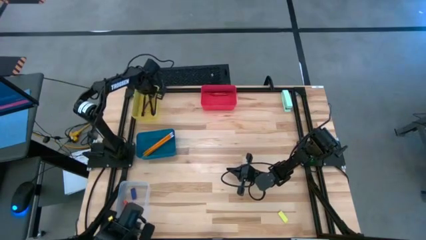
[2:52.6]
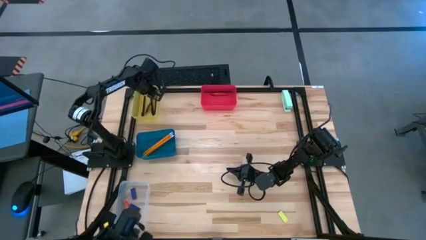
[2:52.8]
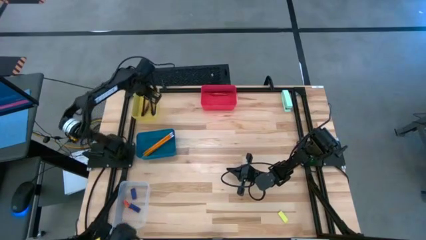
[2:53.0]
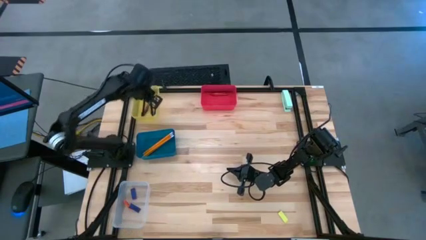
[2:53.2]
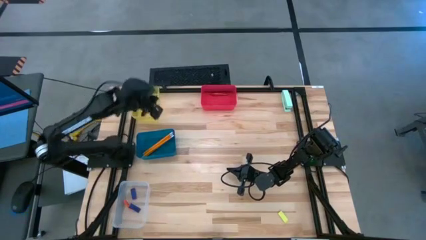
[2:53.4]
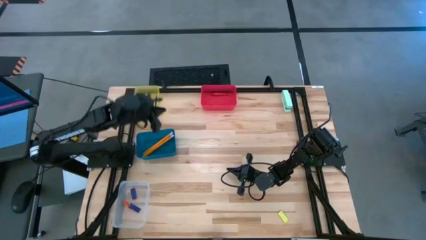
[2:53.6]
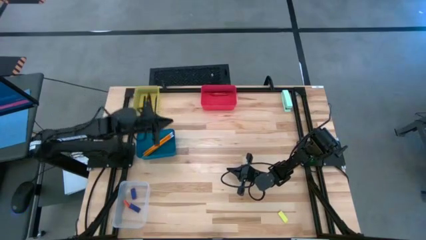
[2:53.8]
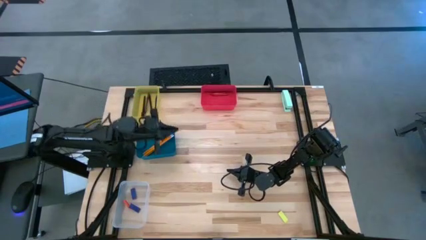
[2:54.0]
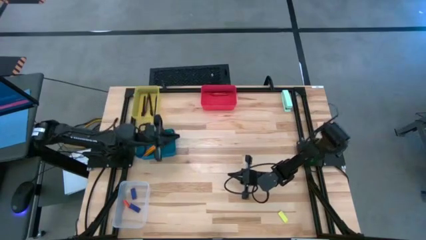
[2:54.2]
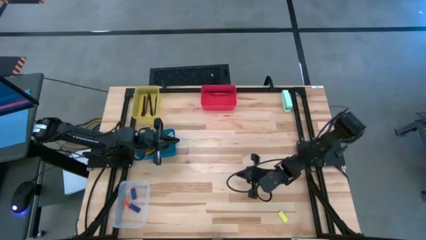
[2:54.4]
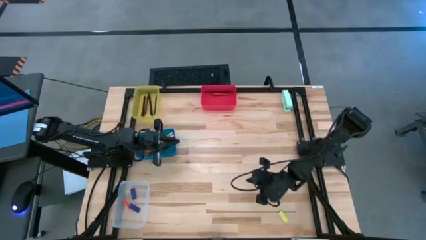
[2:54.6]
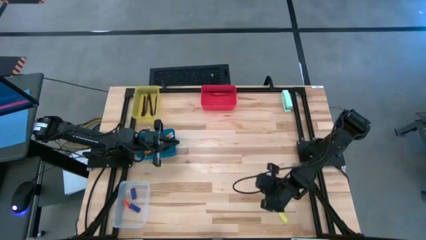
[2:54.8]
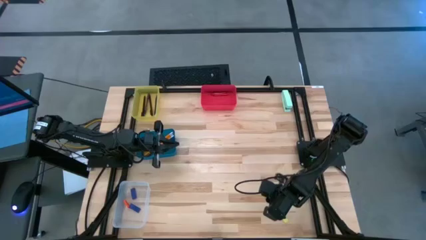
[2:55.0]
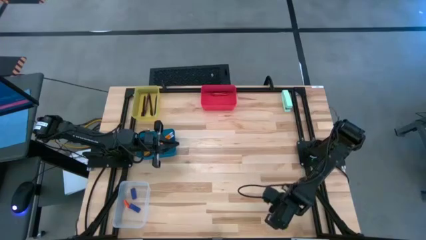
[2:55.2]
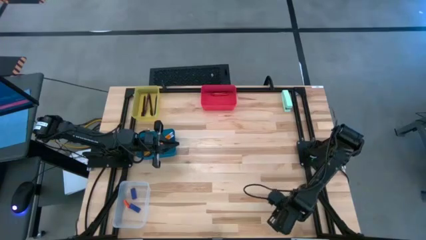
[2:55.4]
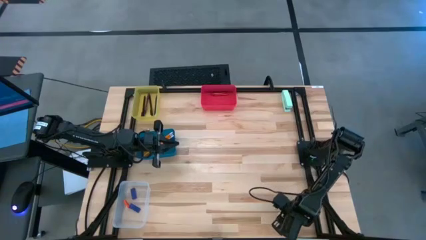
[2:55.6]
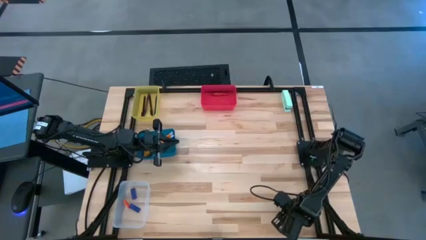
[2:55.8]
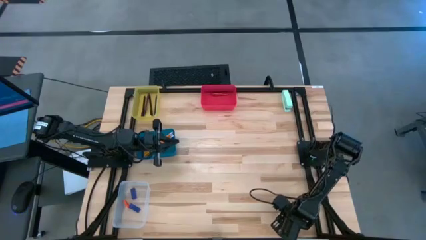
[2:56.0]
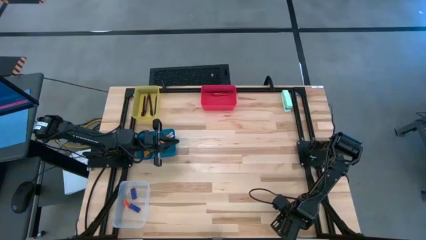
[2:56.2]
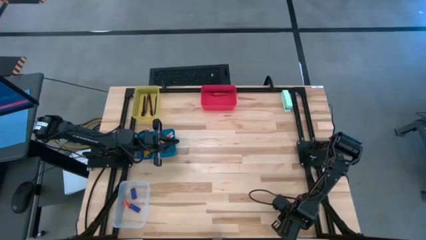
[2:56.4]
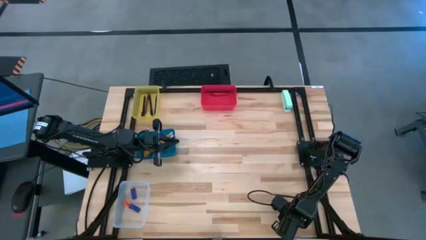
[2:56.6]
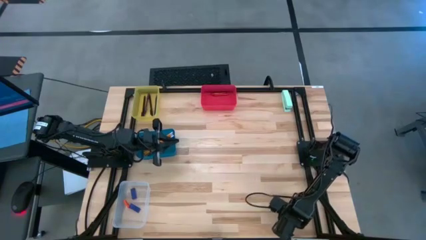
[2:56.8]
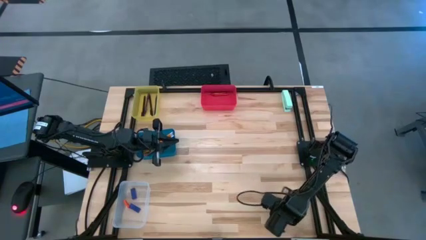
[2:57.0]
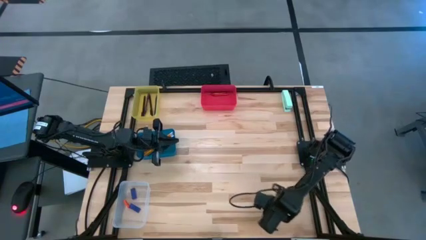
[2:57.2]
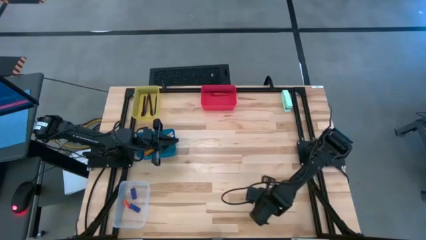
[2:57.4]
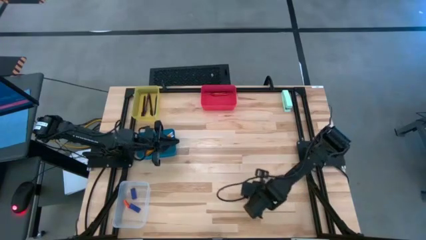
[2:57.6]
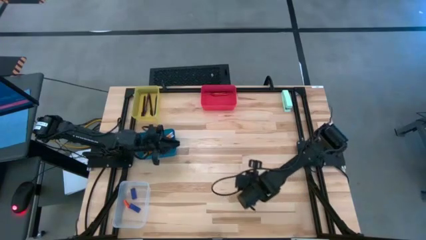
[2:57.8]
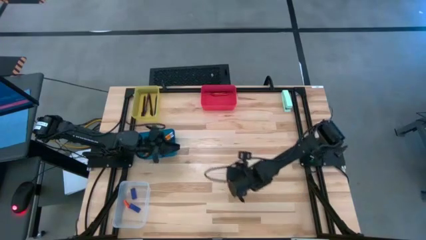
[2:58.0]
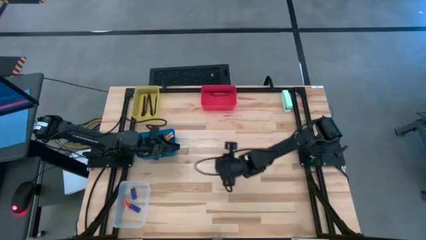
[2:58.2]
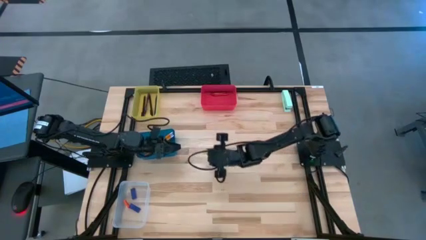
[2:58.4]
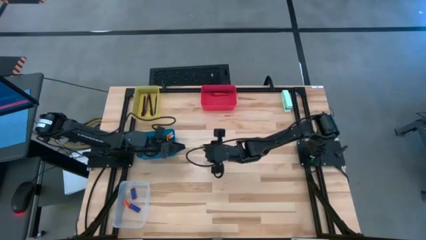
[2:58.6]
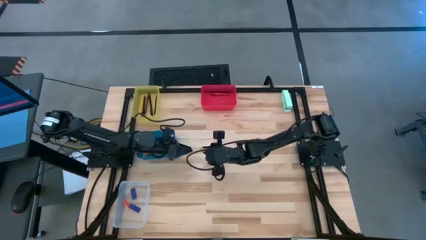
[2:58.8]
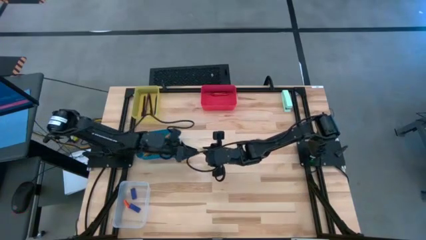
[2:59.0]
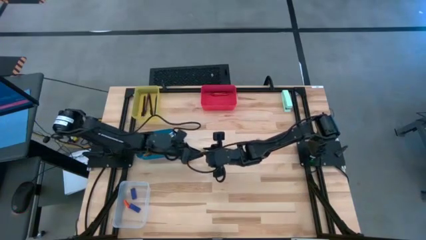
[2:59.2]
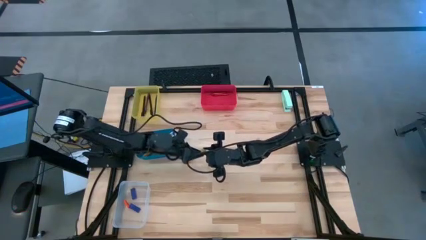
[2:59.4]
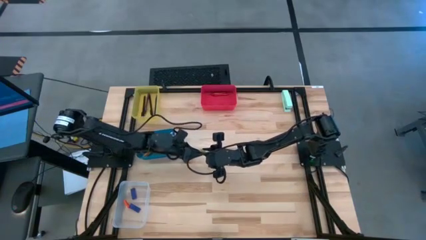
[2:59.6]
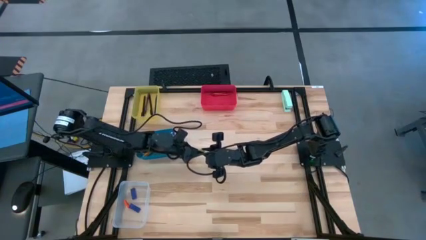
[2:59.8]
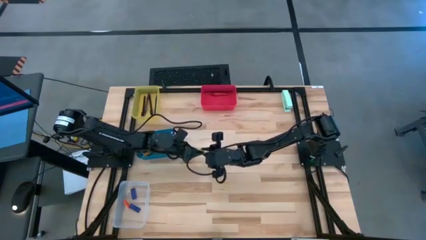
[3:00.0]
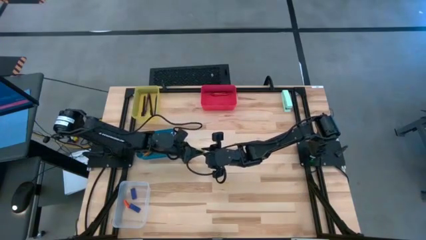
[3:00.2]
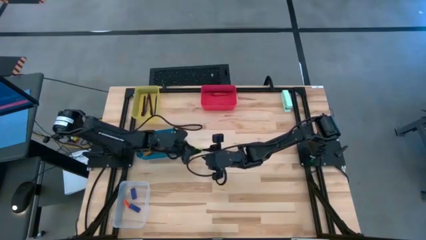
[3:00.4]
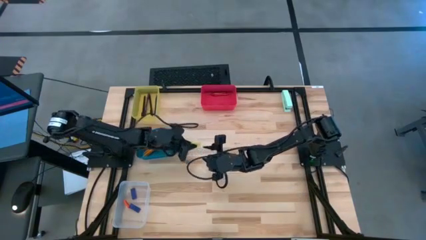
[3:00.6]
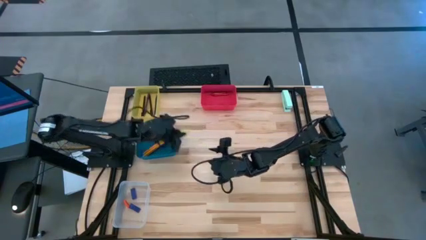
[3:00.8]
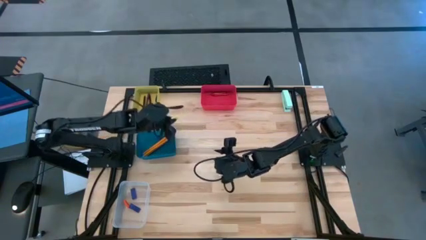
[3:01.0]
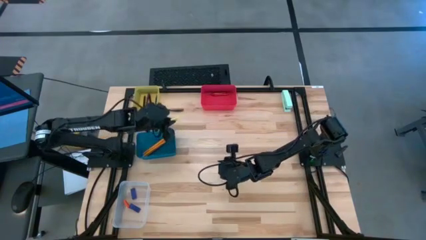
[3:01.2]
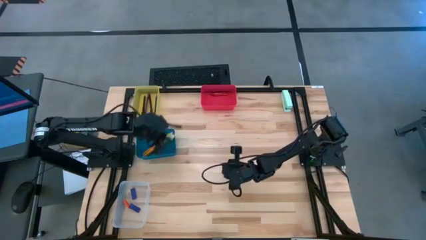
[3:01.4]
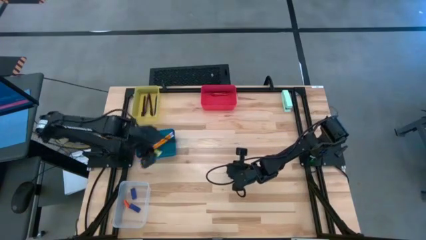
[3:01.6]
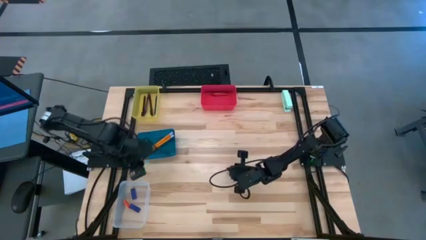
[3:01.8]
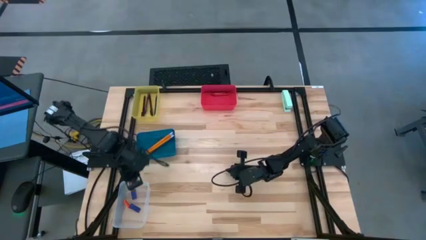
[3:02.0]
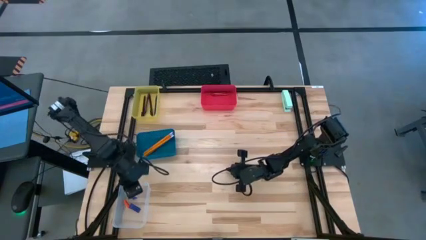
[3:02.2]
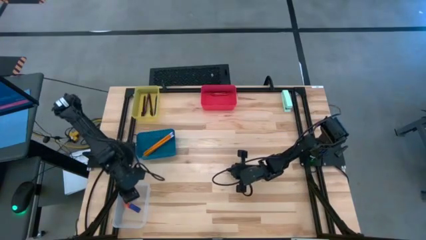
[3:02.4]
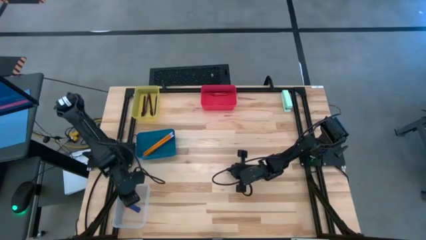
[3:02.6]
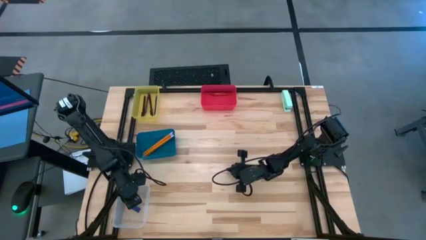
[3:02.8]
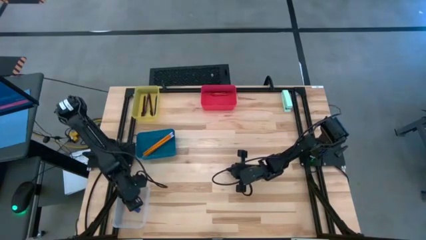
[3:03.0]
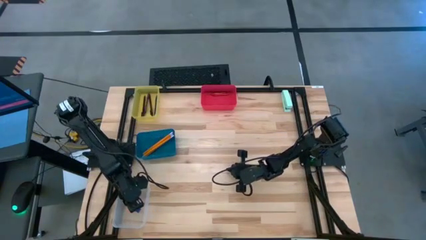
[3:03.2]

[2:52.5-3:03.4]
Task: Sort crayons/erasers/pens/pencils in bins
Put the light green eraser into the transparent bin

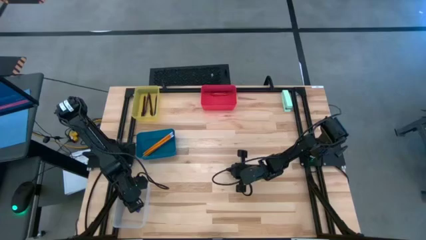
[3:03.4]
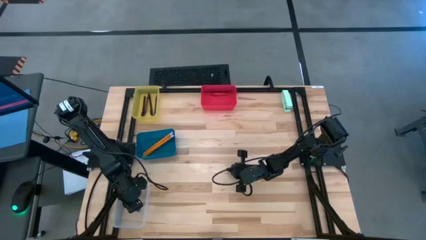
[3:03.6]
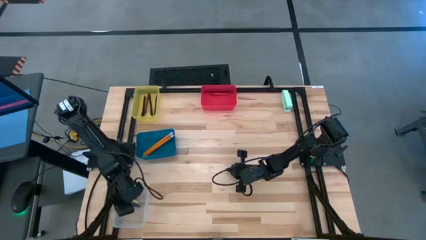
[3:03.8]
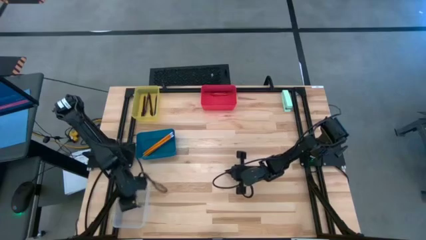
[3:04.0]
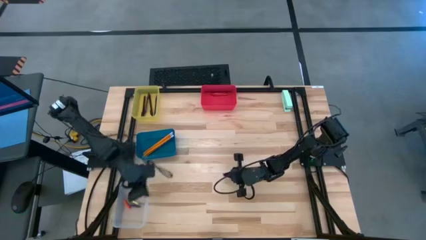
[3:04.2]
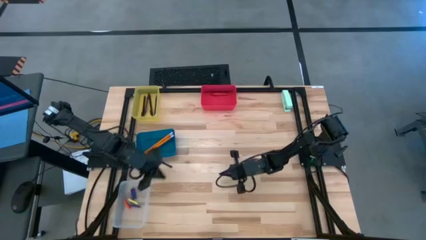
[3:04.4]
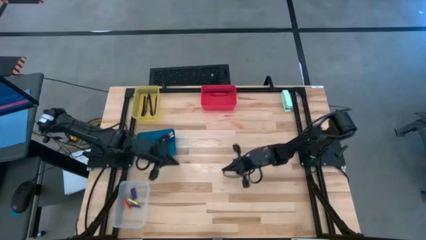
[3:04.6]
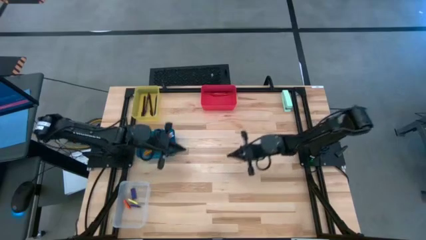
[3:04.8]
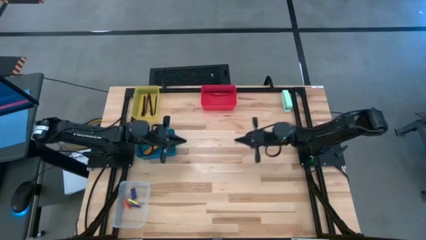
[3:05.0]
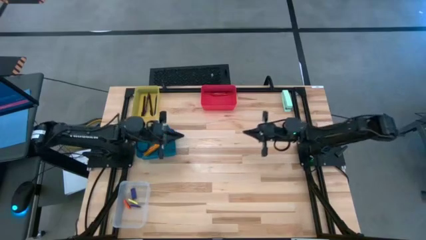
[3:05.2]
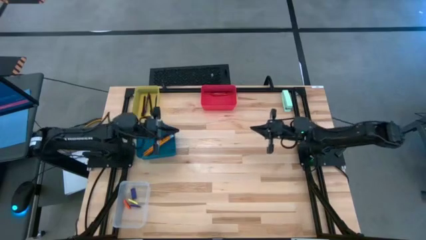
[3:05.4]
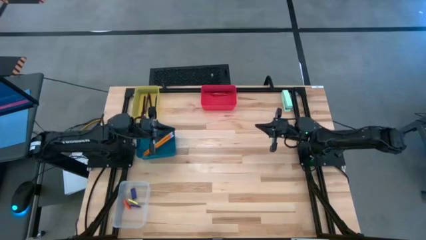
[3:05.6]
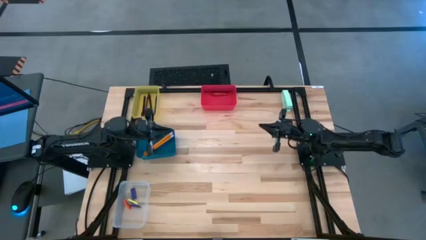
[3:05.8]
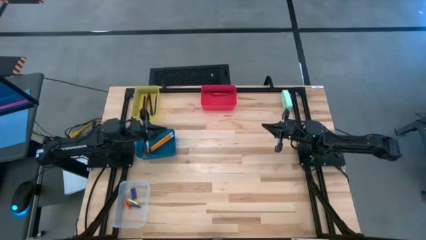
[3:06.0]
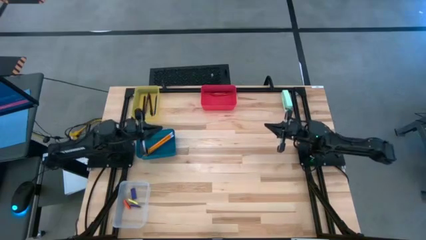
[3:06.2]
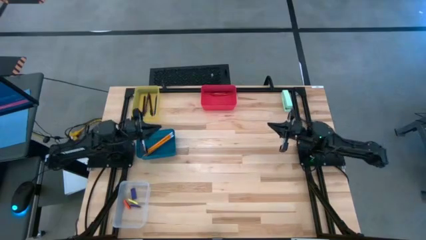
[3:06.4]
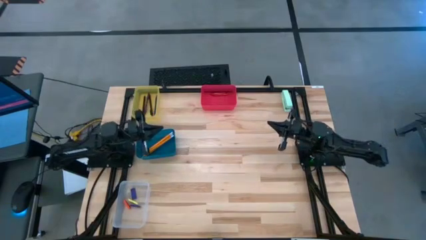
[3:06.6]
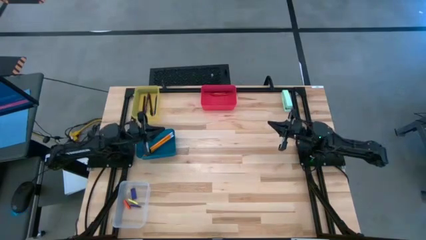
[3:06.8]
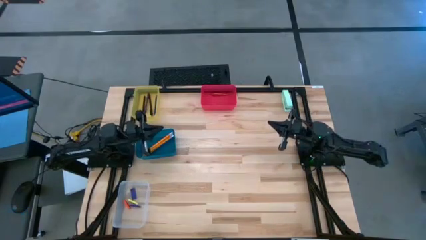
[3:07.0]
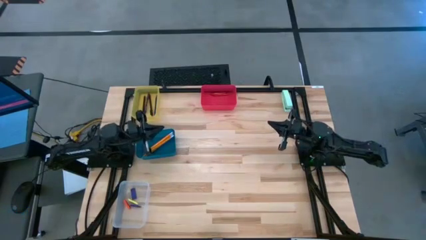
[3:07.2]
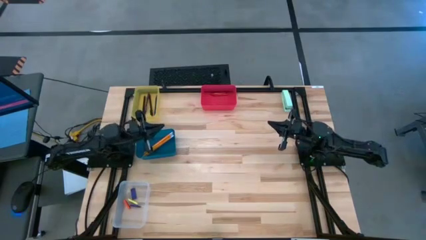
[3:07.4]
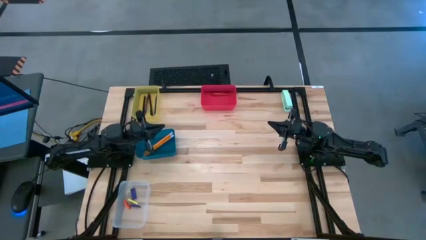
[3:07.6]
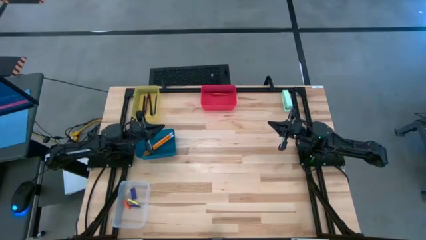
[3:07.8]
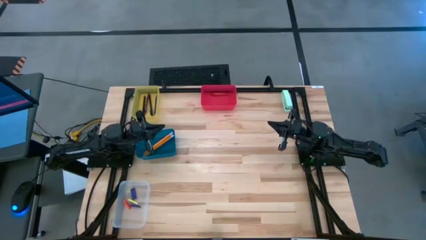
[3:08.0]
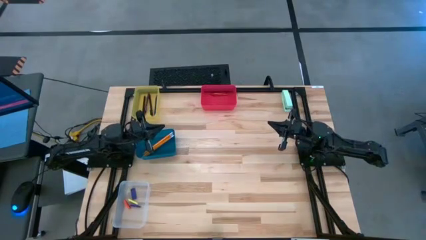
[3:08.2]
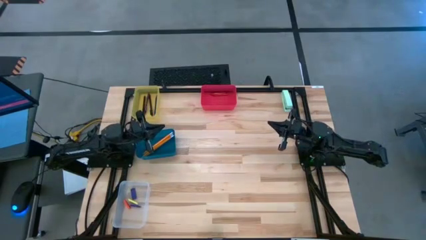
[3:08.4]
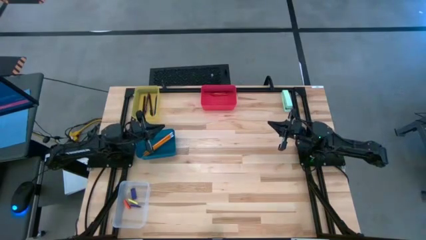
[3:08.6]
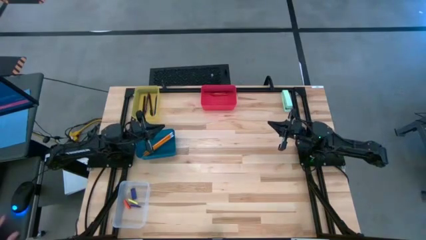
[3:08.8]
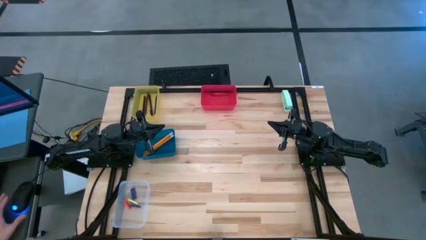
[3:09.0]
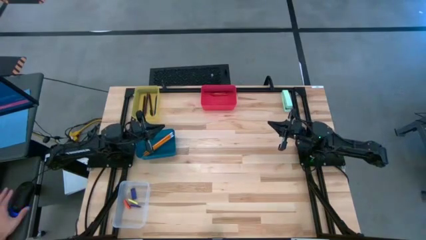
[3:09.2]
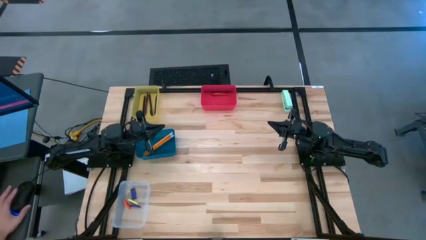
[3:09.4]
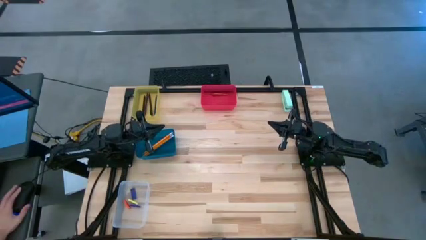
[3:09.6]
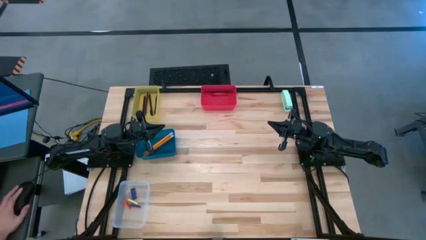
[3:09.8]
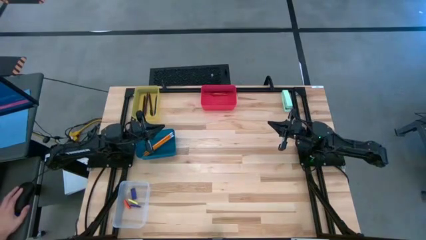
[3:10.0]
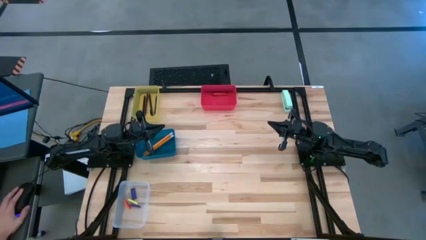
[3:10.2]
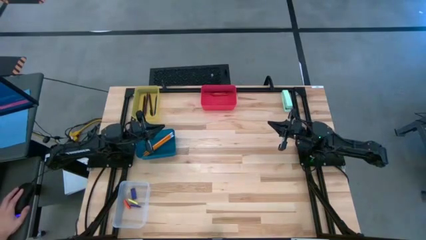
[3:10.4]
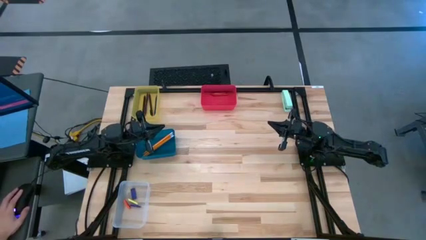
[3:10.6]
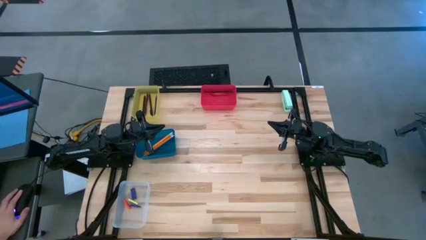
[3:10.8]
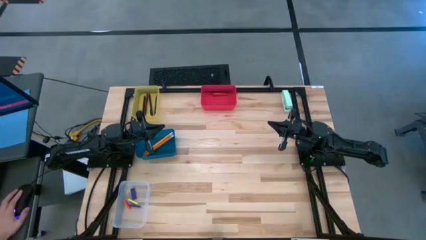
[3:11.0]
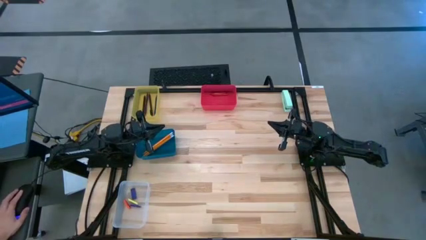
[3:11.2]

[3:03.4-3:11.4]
Return to Home Position
